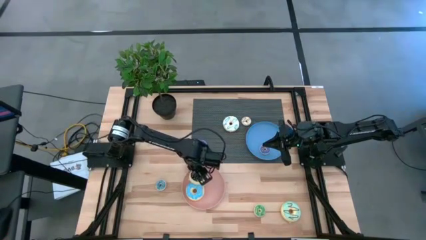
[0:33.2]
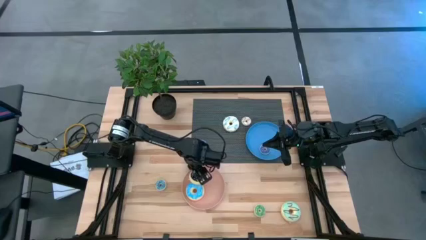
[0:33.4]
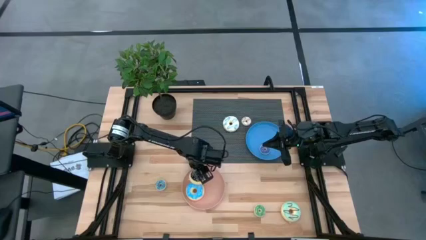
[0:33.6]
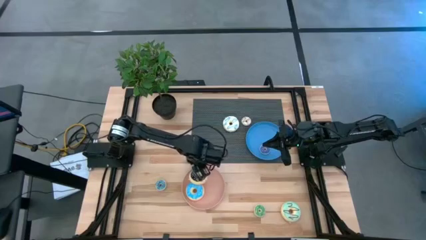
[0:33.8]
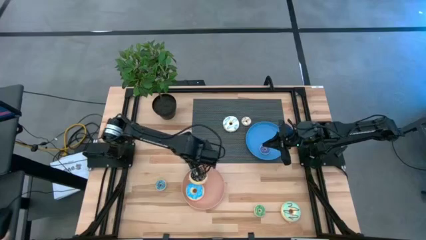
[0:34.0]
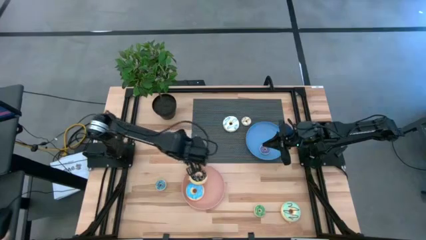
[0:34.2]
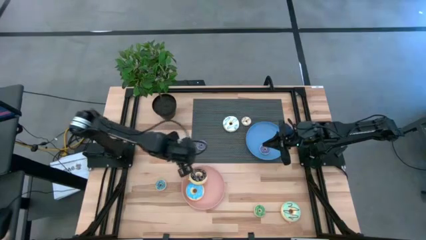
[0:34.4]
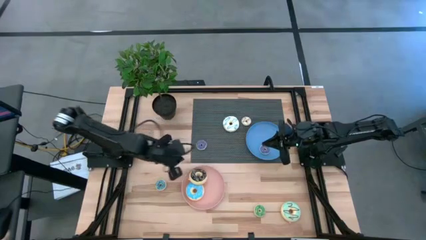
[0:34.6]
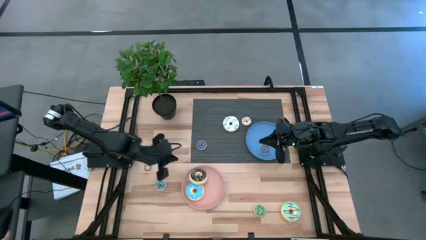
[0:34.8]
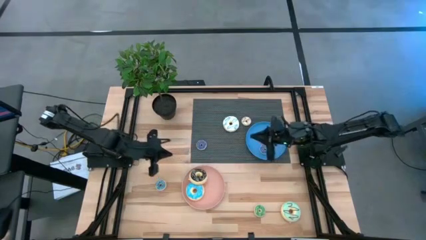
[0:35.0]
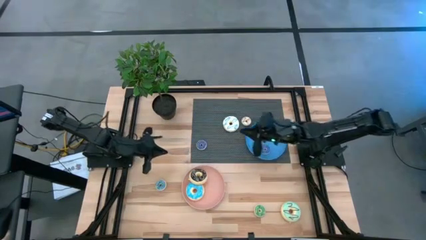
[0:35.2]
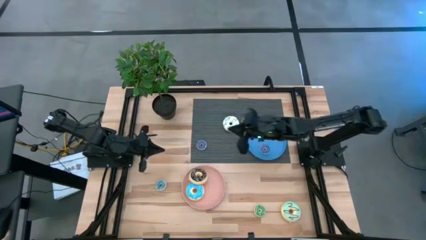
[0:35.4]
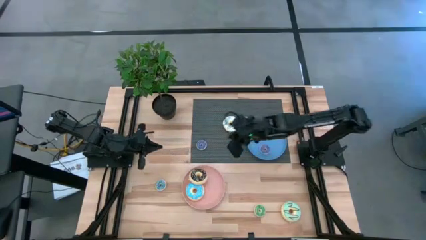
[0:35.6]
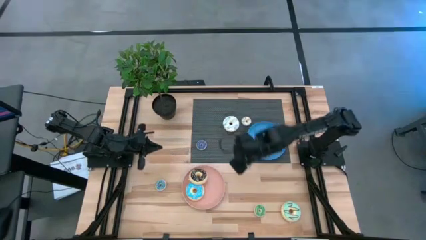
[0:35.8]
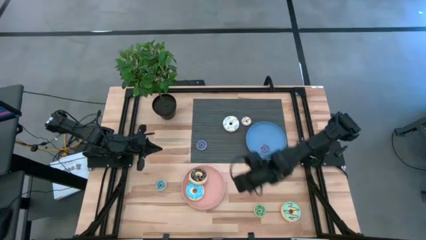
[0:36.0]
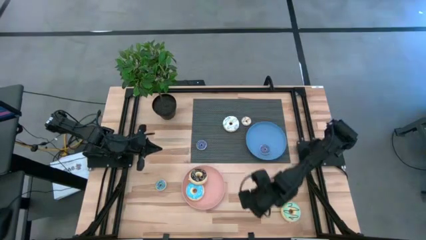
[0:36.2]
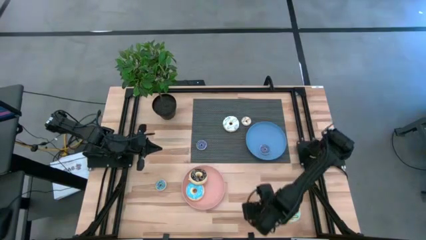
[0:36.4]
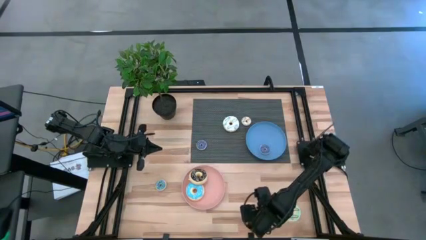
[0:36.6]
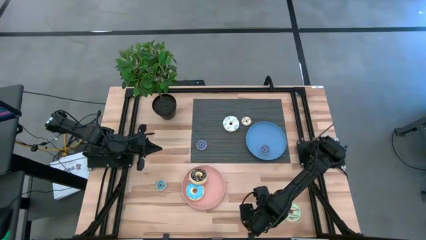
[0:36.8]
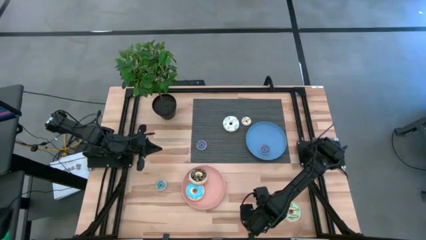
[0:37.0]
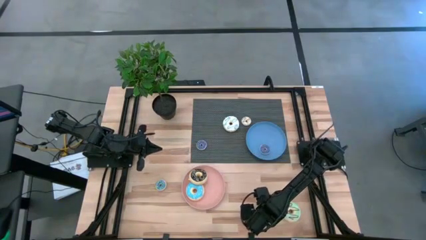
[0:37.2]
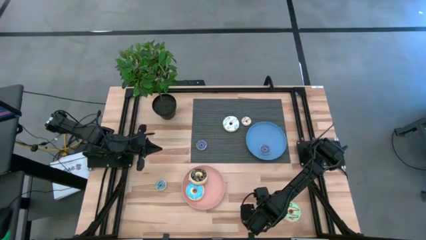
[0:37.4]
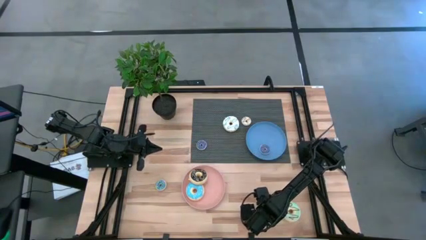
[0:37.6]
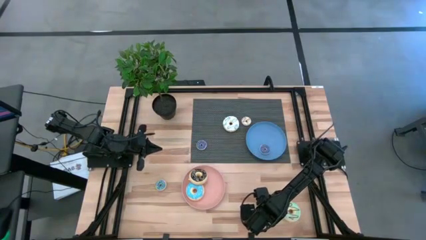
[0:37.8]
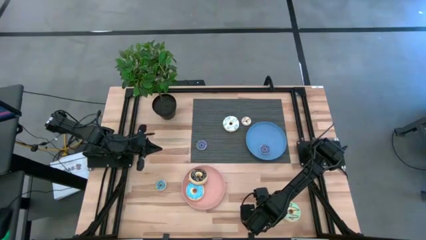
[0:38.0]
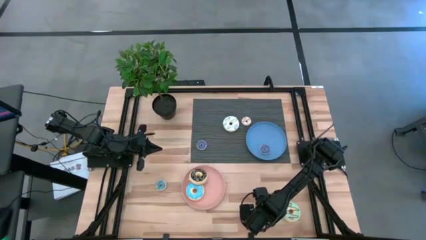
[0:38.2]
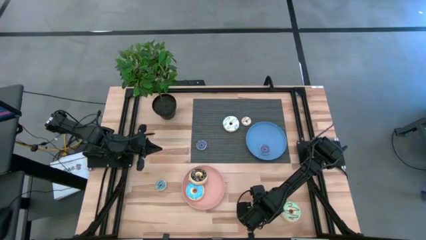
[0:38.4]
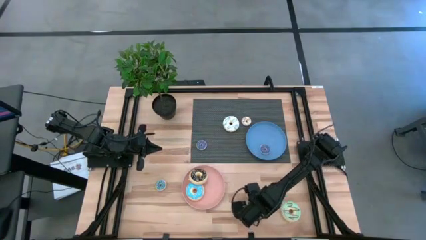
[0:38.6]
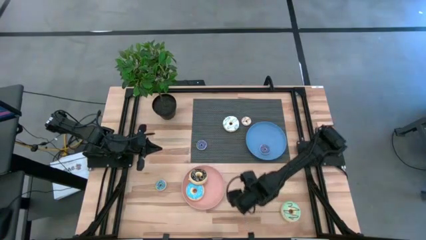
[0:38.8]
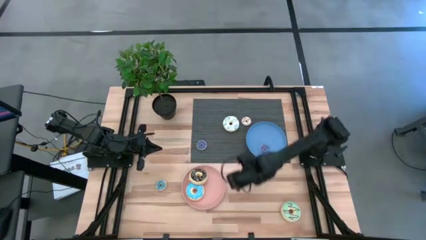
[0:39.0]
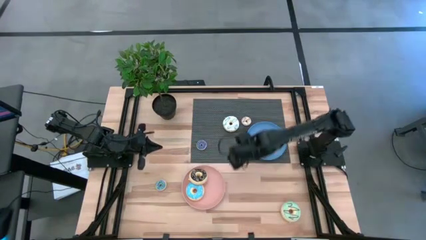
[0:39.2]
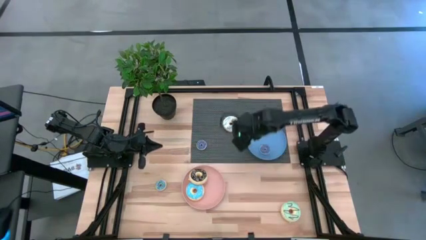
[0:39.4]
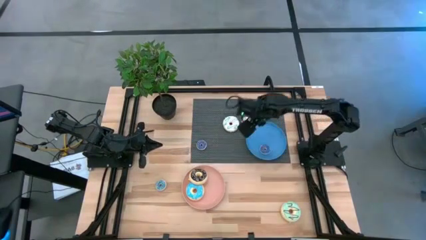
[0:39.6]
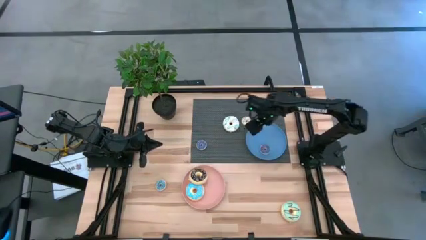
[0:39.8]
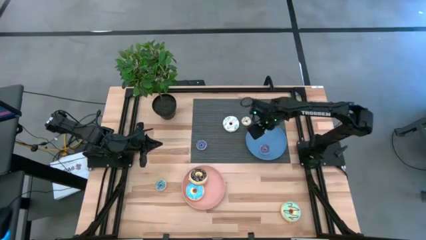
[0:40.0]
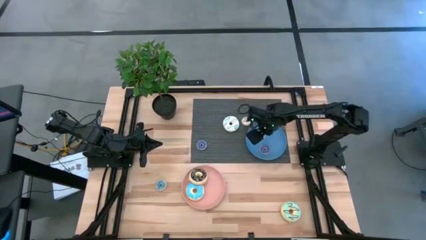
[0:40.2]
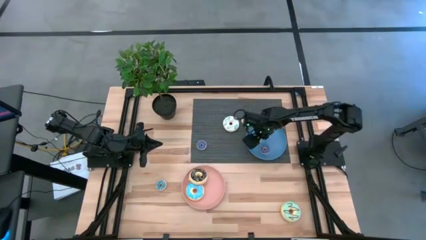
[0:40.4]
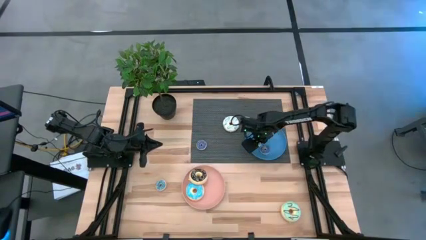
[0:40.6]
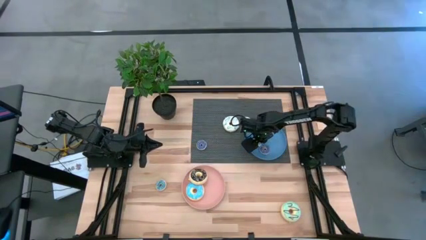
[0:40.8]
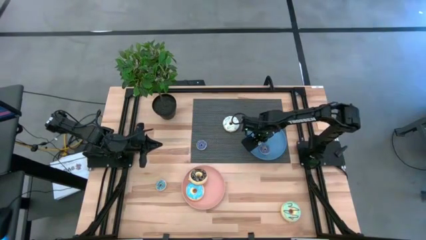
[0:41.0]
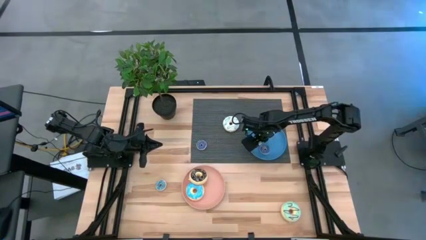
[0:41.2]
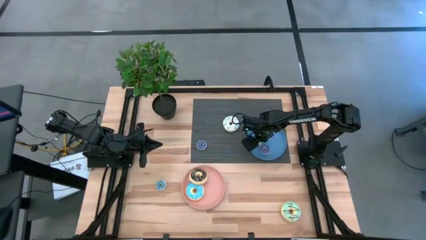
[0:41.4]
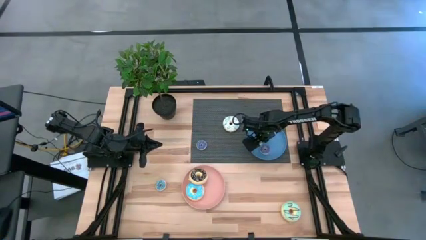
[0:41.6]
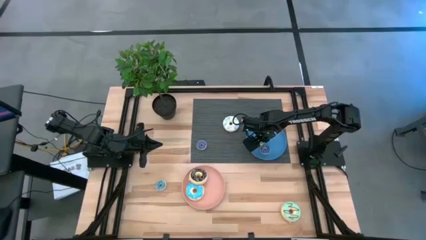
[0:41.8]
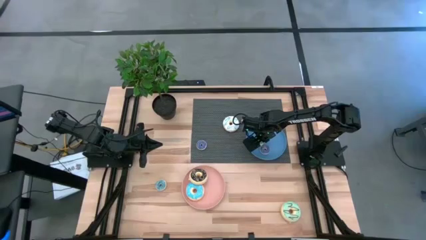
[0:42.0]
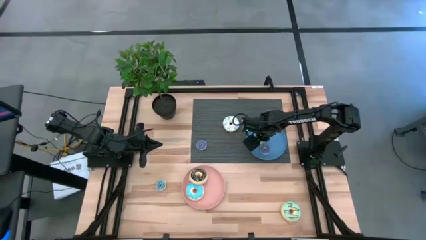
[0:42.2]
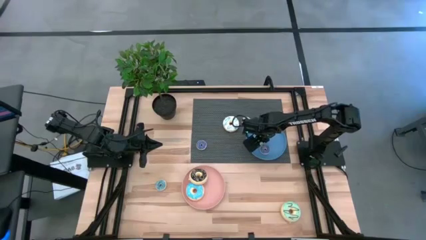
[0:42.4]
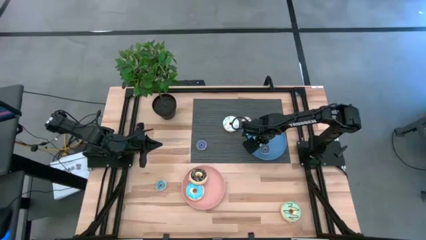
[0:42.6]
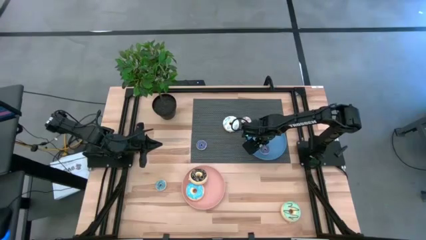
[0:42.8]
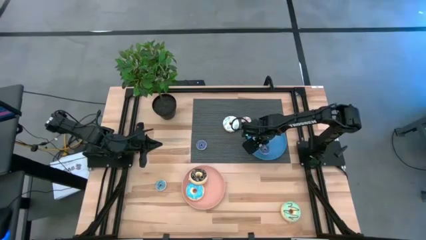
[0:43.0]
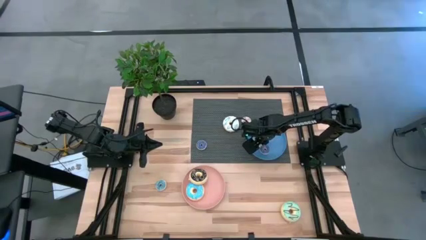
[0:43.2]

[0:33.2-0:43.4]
Task: Pick & Place donuts
Put the small green donut onto the blue plate
